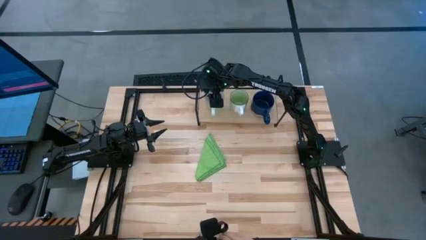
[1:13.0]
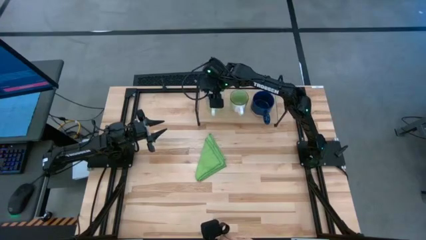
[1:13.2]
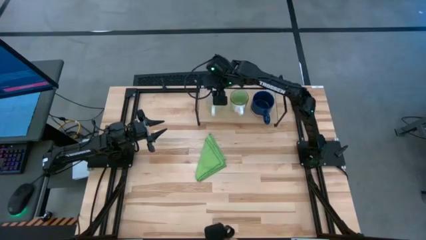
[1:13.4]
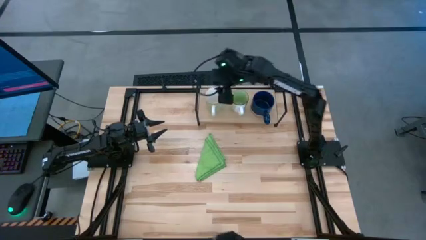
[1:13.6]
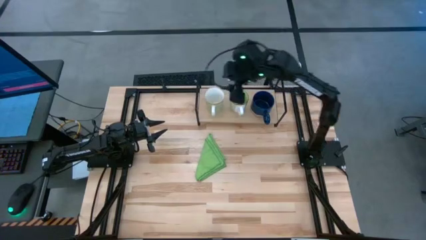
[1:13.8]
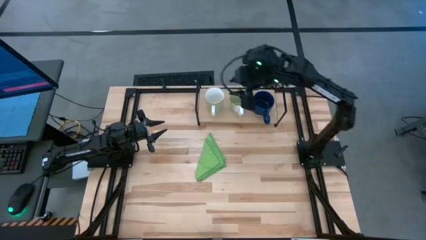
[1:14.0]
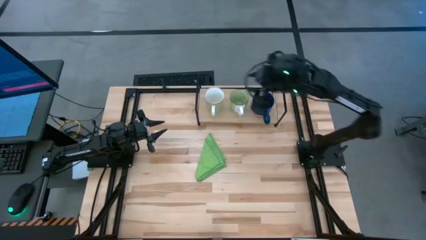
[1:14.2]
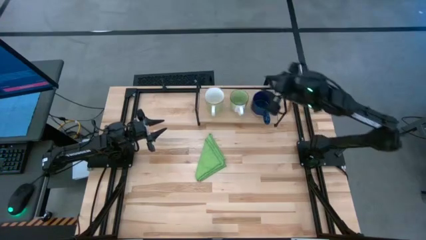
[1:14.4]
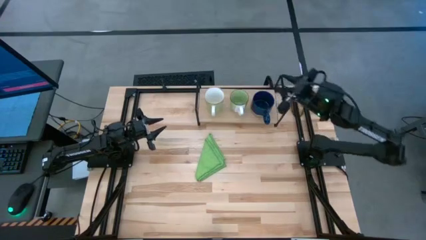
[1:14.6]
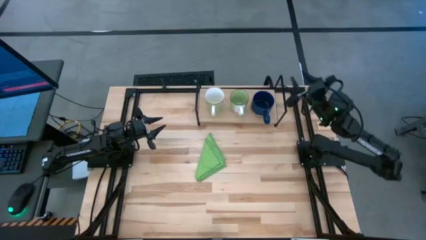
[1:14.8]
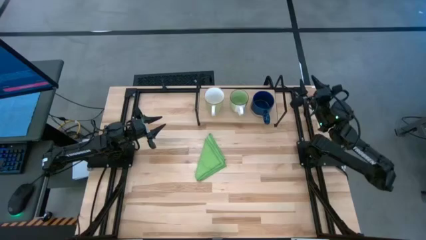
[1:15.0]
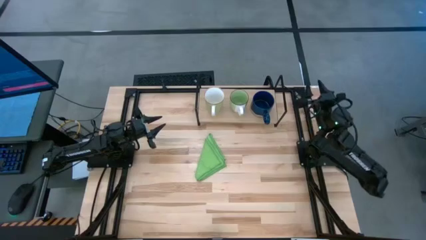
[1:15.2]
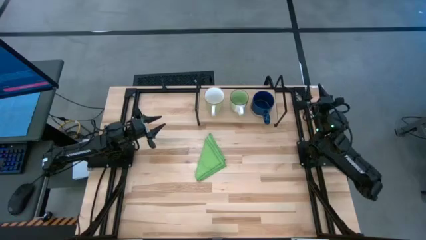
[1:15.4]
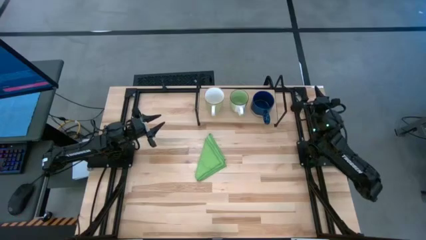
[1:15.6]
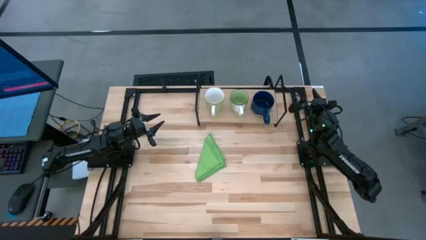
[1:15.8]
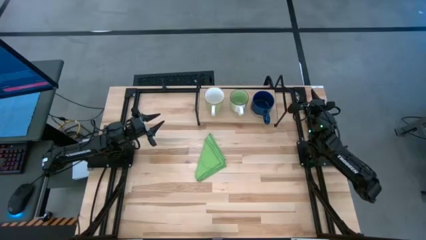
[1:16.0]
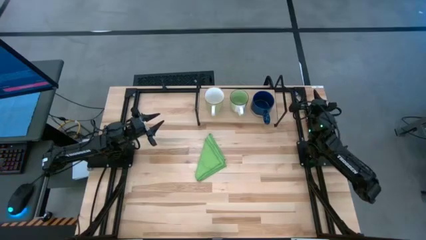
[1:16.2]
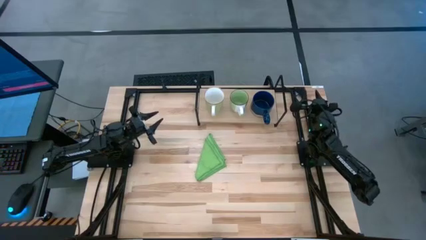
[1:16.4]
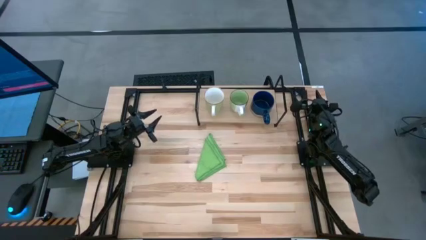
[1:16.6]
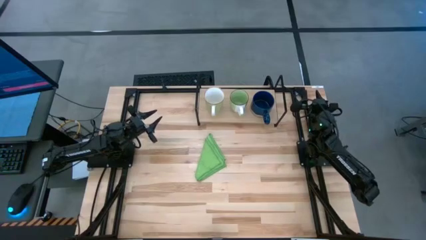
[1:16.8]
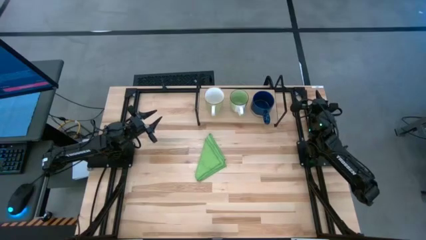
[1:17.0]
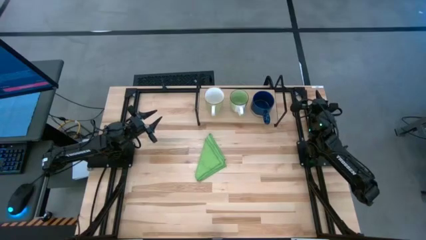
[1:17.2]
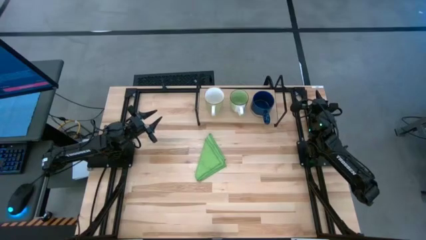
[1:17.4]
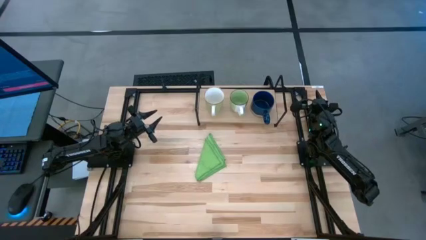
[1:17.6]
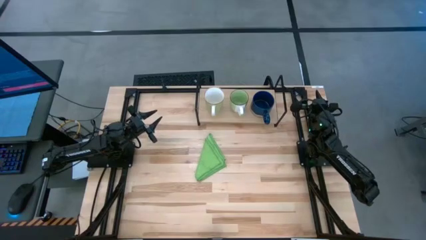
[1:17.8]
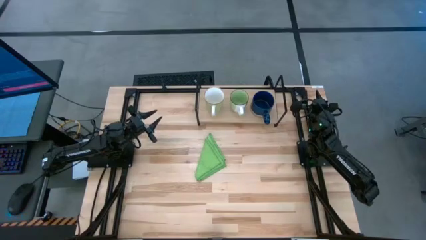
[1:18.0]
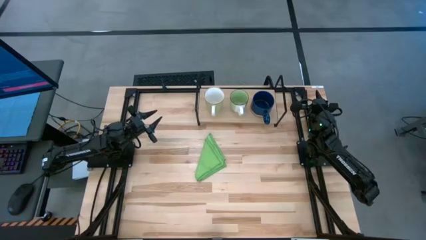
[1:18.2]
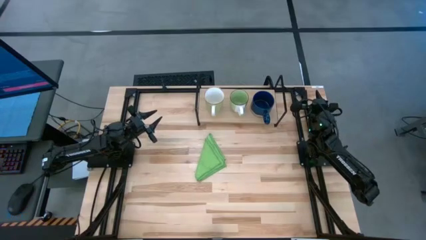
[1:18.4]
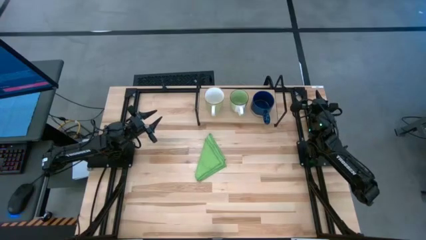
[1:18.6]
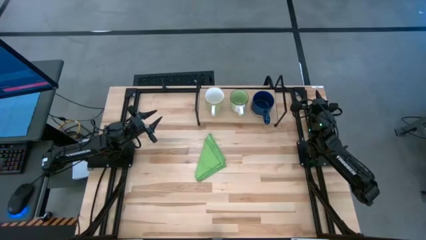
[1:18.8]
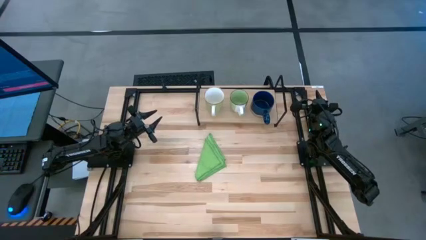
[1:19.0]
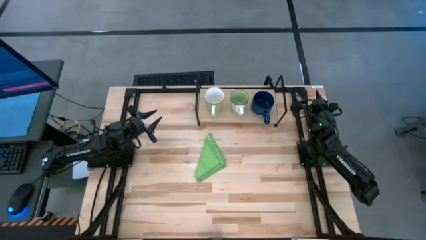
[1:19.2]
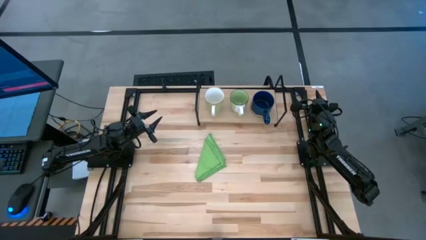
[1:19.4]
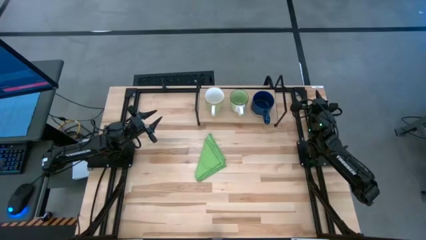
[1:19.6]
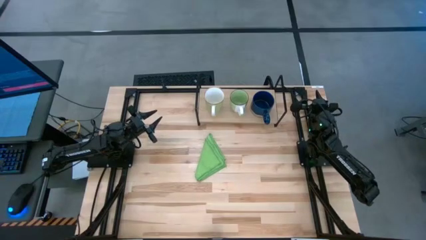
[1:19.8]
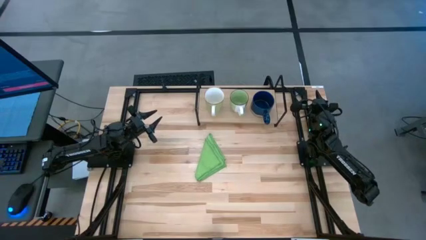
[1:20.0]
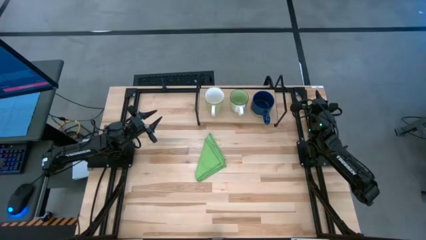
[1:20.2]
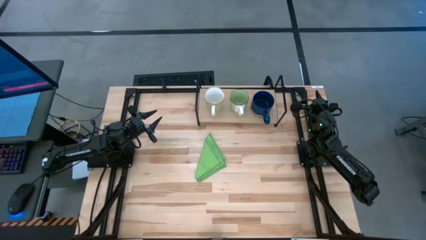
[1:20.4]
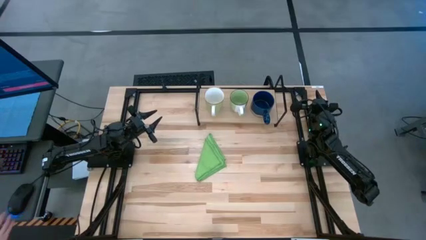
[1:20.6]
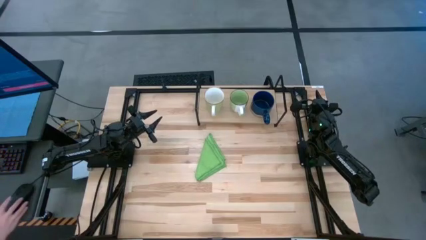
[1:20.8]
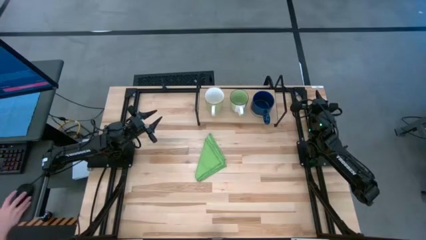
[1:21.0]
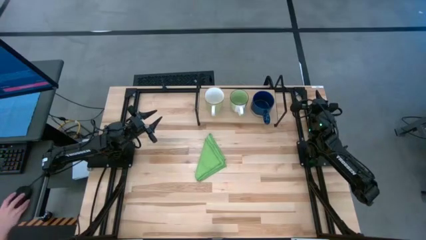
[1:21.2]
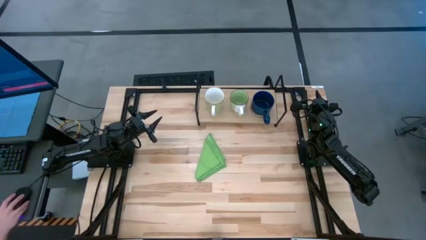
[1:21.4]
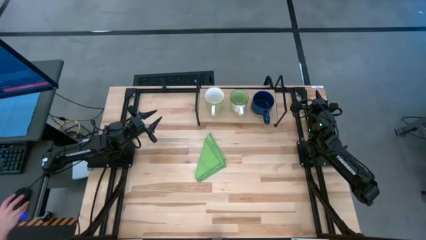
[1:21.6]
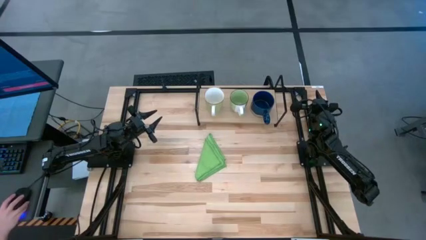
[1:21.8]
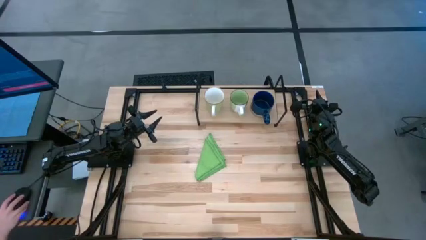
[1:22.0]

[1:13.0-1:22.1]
Task: Stack small to large cups/mugs on shelf
Return to Home Position
